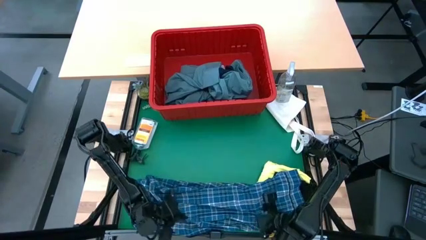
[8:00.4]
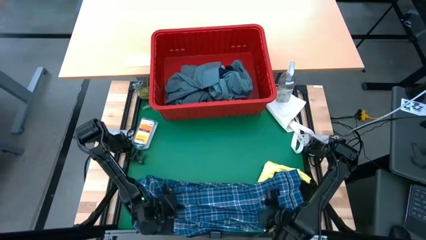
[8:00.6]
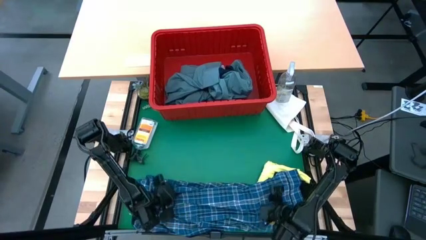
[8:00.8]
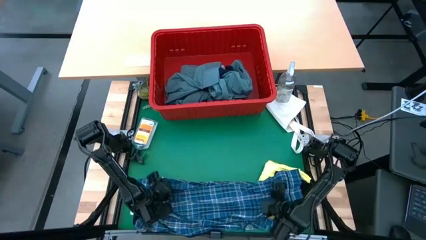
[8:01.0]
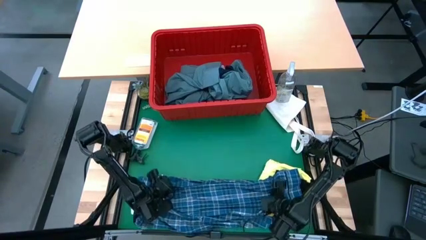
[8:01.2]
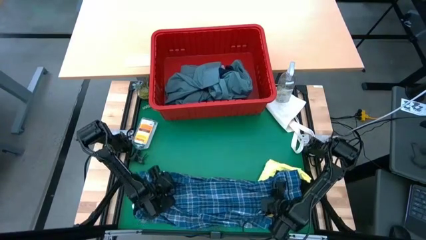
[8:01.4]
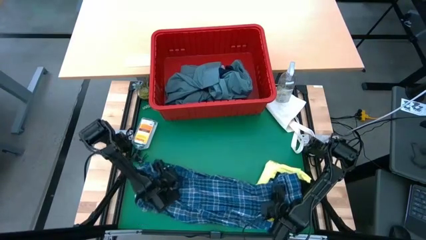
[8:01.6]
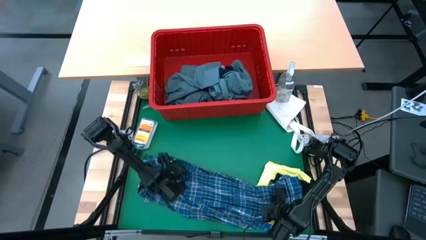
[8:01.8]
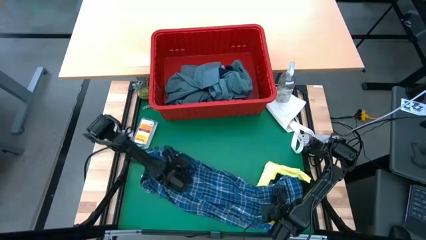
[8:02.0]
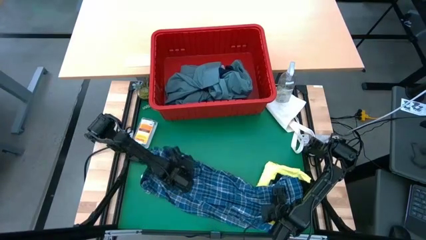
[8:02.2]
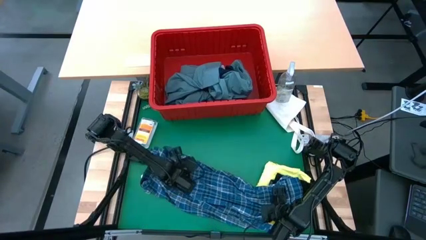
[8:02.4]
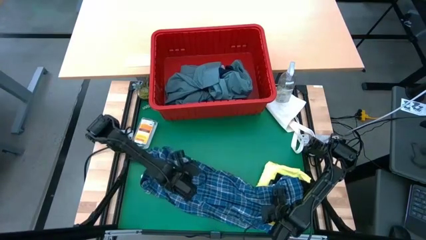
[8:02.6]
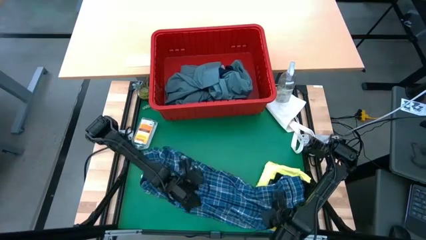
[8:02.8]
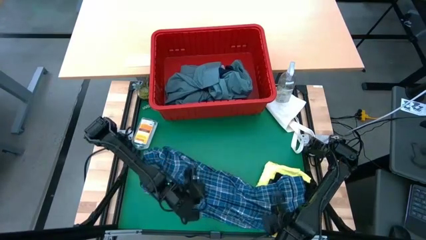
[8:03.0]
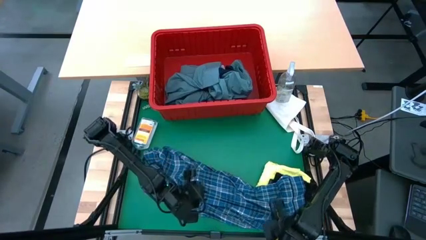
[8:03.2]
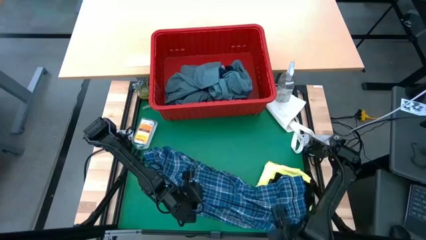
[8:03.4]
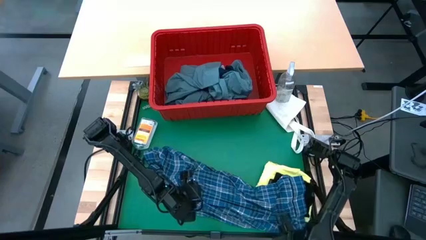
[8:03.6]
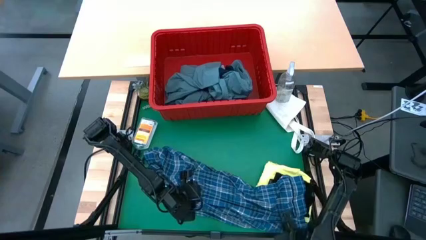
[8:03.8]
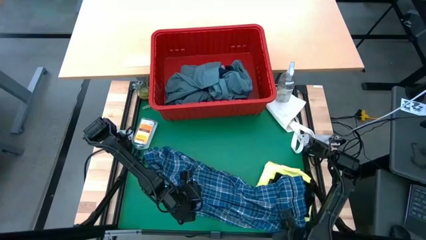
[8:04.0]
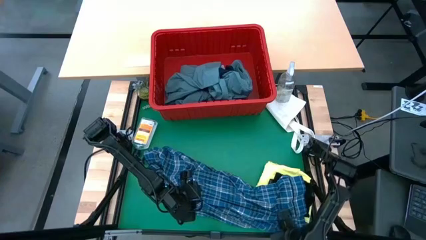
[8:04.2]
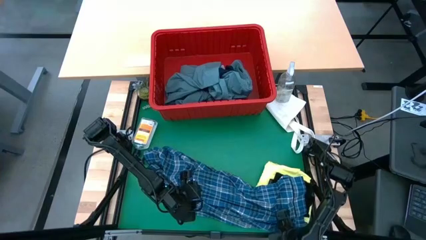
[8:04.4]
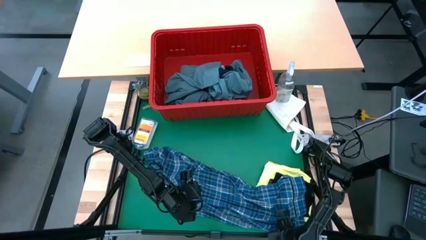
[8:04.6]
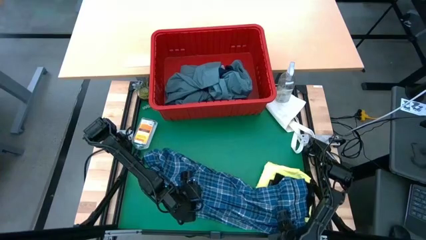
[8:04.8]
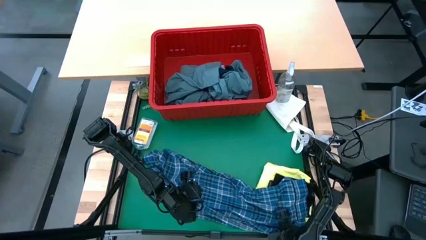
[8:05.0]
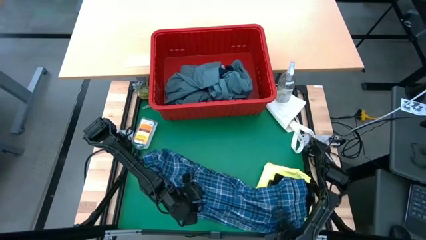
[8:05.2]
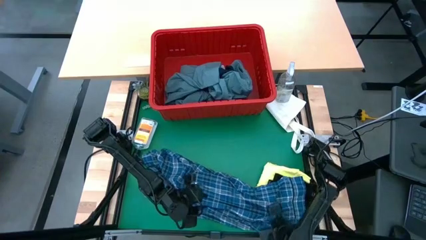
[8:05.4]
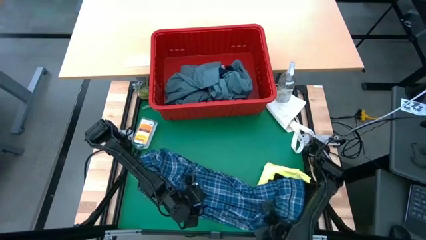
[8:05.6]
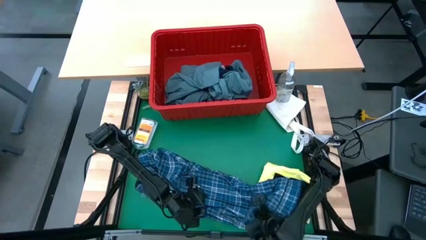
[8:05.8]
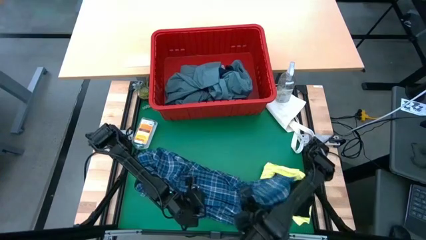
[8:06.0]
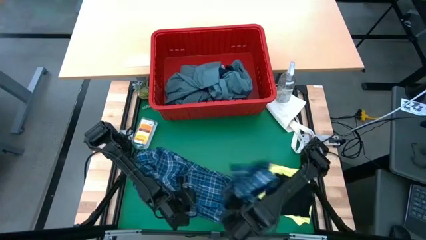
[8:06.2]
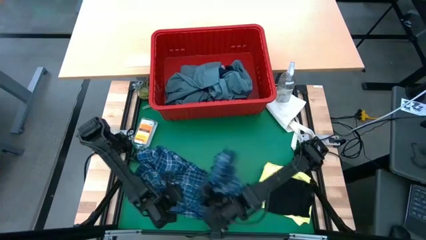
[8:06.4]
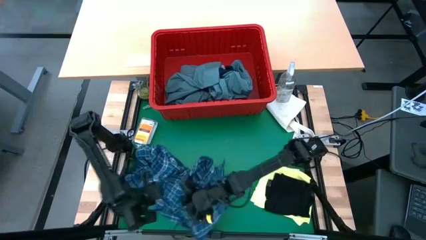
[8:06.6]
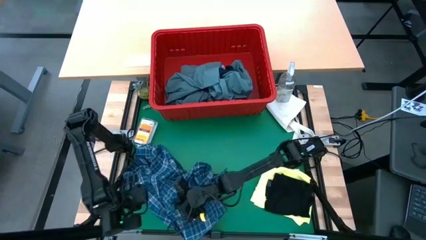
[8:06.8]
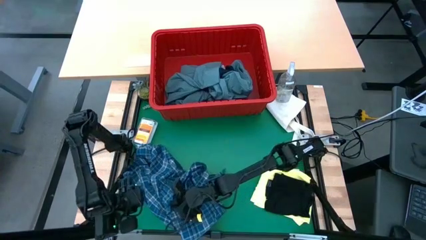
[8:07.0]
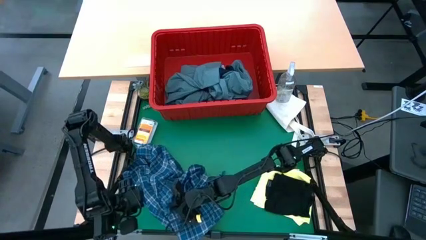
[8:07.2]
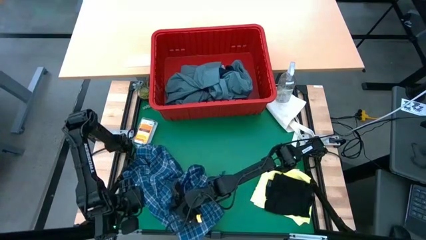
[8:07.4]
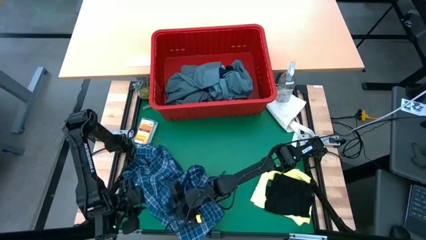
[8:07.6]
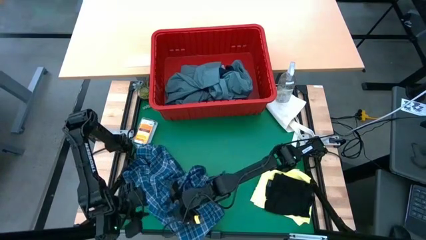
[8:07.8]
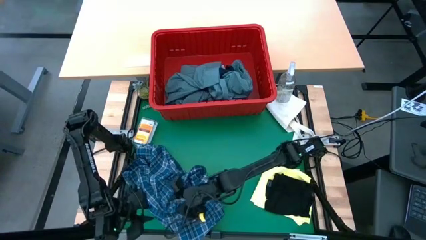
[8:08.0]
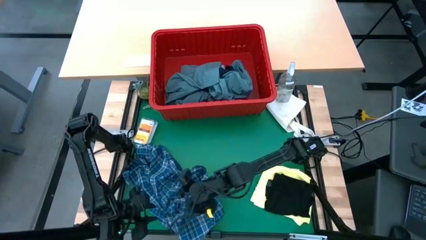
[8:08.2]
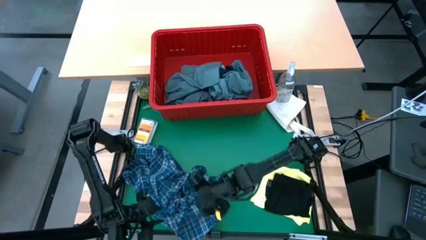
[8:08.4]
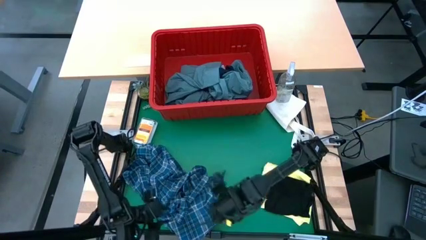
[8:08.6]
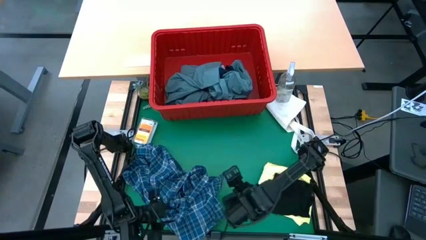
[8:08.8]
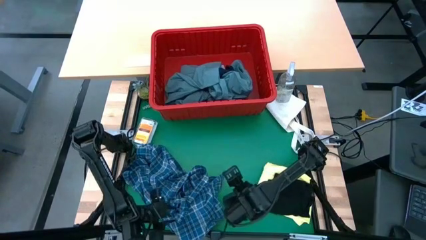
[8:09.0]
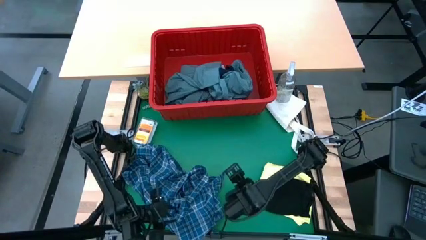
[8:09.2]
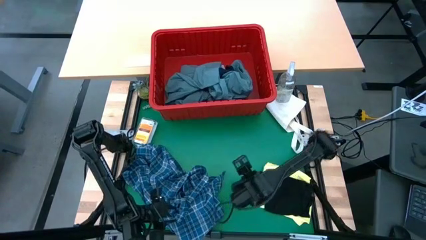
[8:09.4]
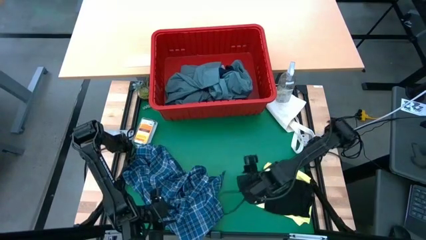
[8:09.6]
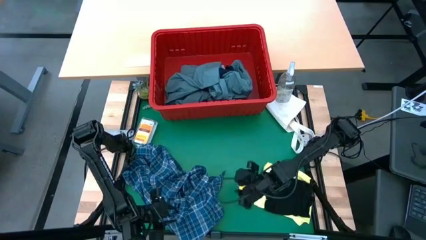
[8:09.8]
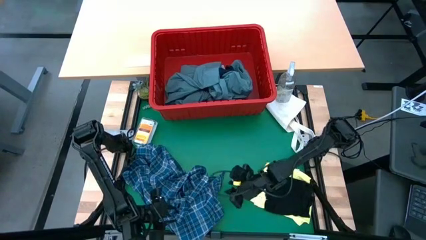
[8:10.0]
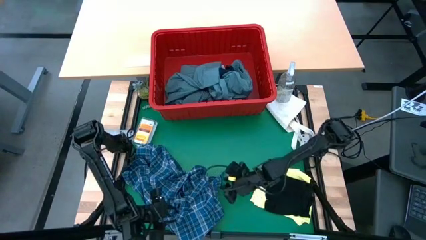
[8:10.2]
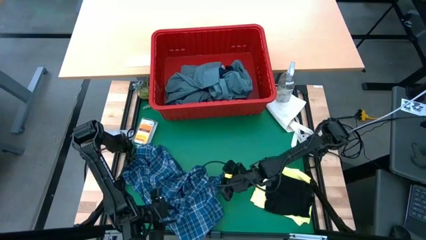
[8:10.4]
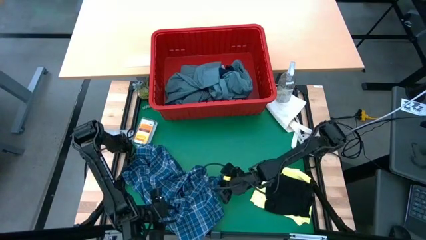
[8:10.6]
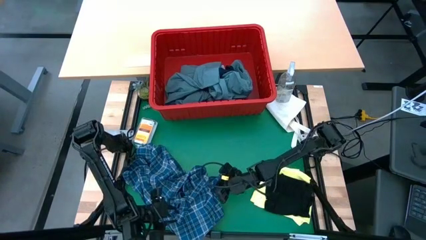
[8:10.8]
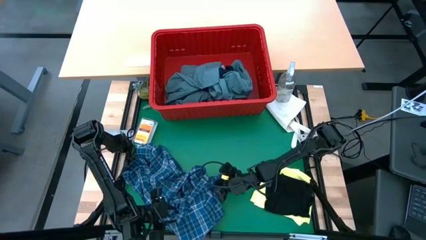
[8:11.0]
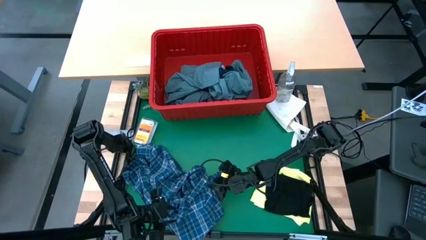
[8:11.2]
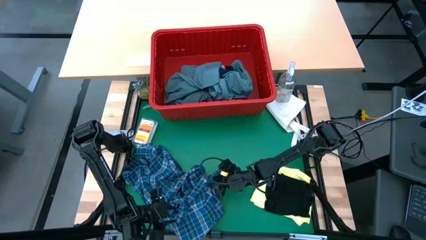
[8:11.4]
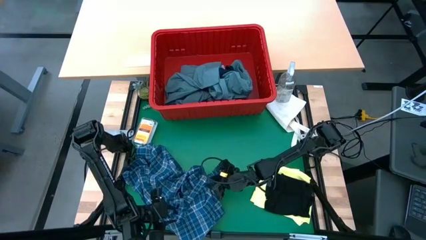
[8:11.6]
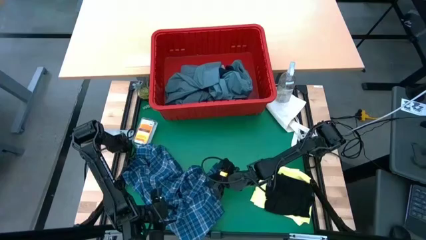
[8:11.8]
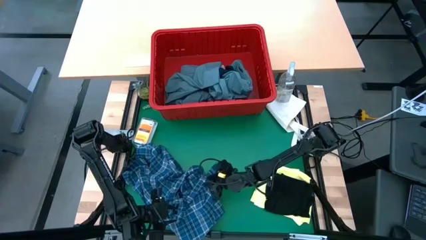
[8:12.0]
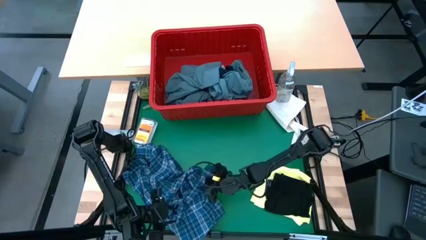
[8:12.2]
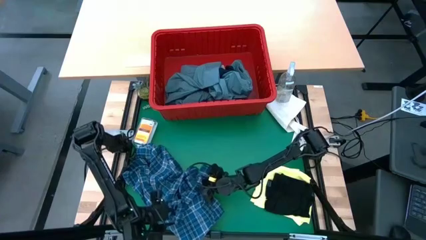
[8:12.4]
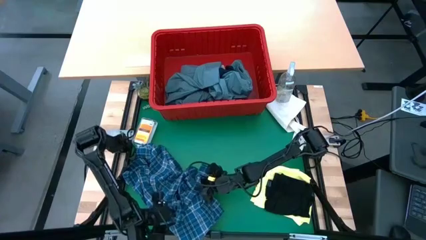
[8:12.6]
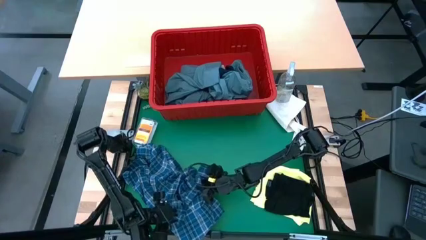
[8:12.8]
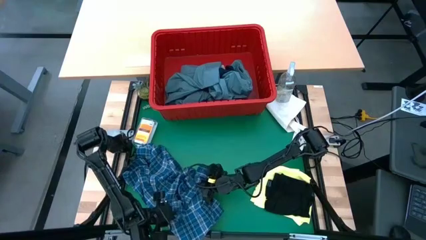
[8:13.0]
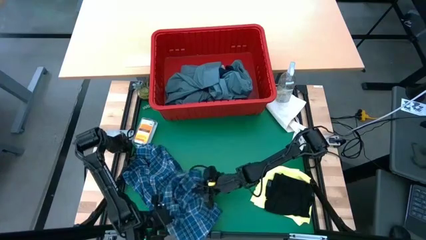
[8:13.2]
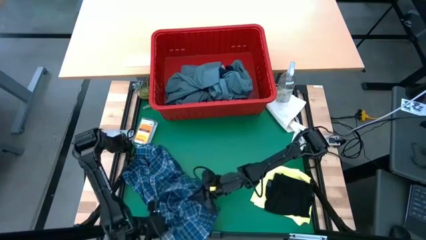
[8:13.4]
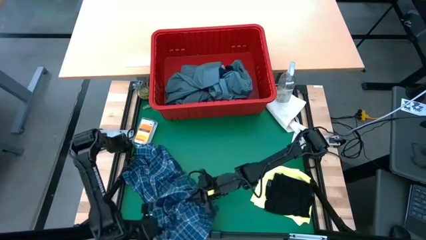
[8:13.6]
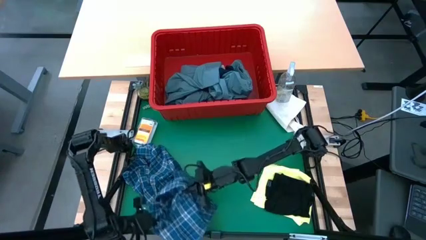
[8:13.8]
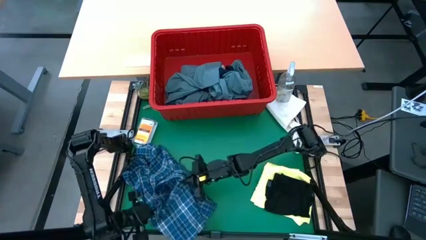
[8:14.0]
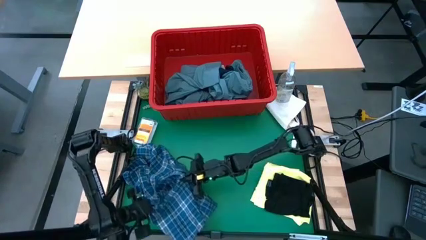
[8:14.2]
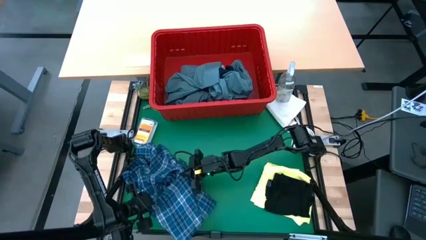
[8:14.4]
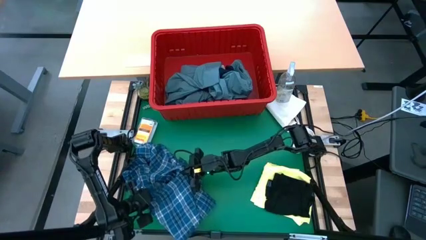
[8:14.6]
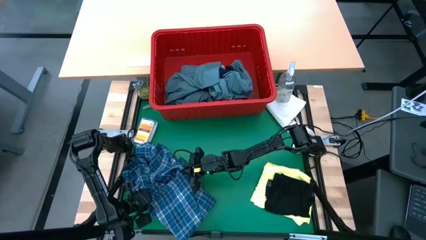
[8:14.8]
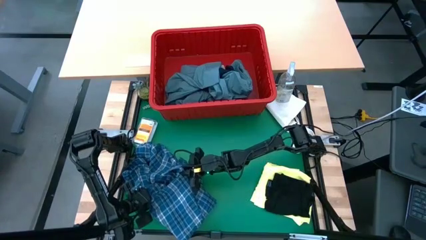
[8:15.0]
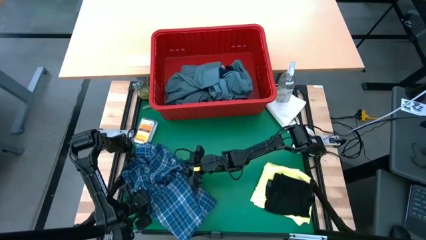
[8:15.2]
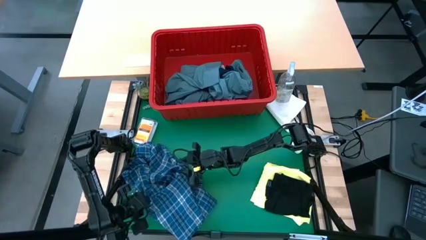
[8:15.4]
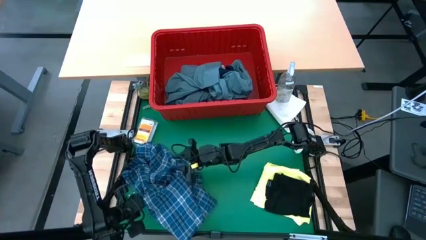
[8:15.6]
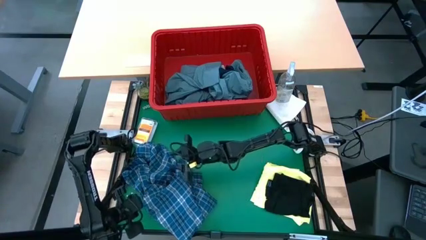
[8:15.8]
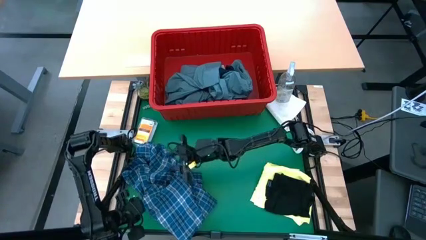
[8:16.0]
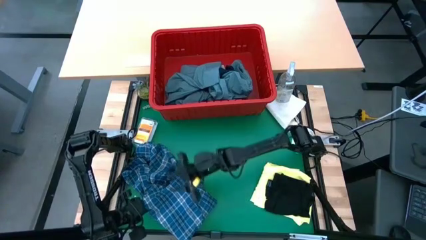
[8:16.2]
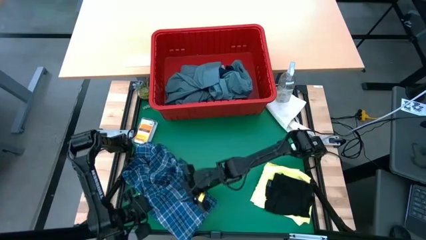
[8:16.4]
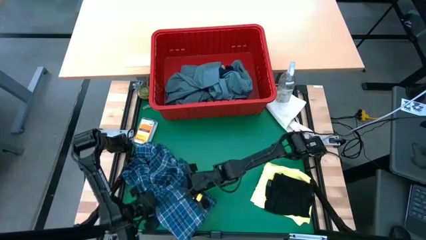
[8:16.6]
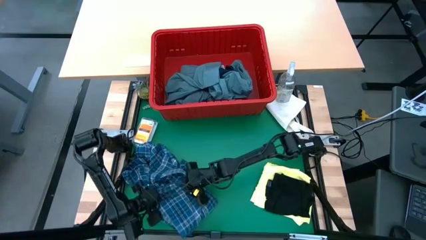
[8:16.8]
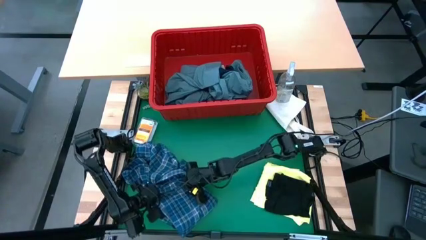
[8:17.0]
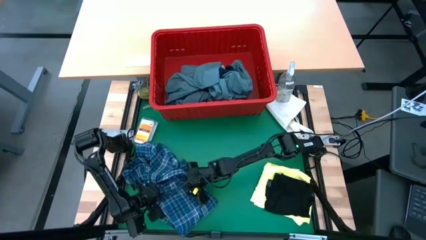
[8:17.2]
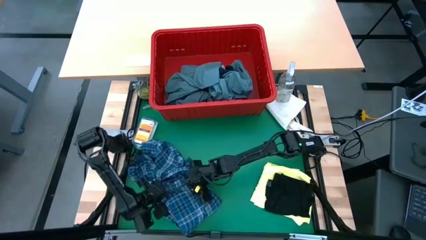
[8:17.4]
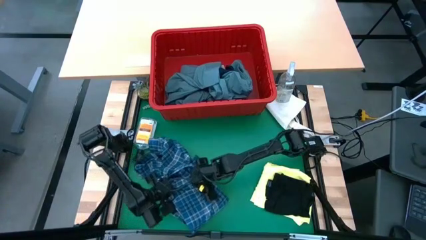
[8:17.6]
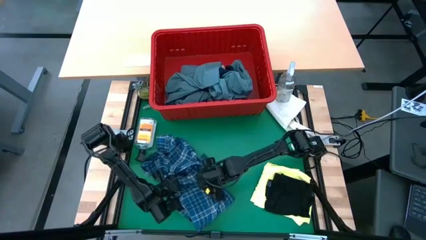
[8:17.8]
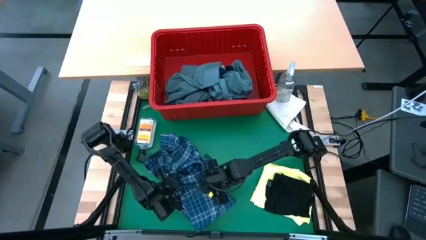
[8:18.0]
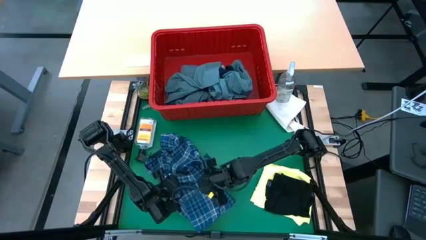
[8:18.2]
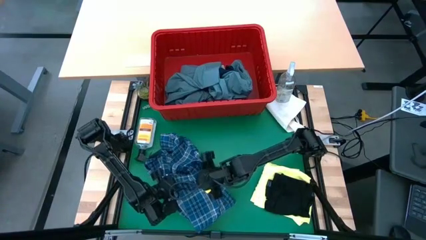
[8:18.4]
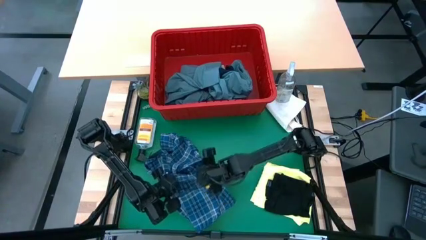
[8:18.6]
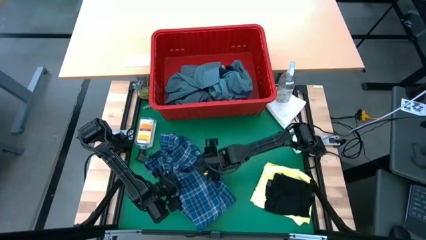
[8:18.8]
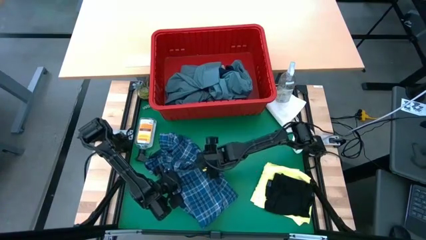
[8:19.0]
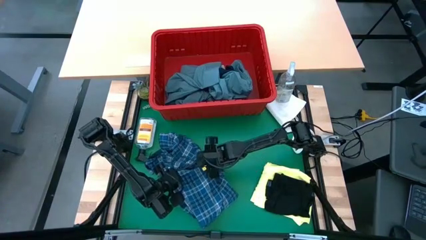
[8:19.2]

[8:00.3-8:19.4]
Task: Fold Laundry from Bin
Fold the blue shirt
